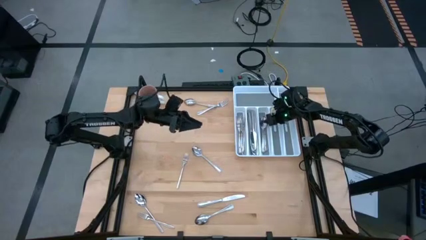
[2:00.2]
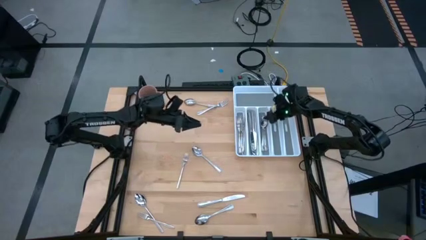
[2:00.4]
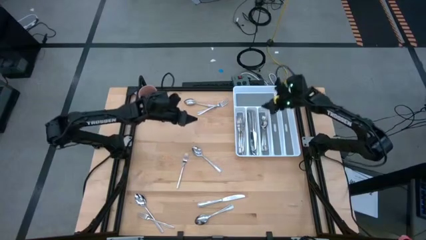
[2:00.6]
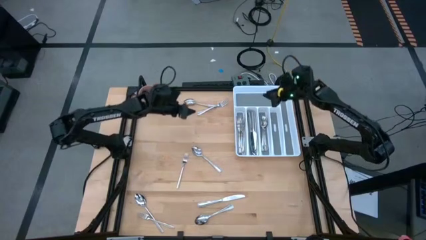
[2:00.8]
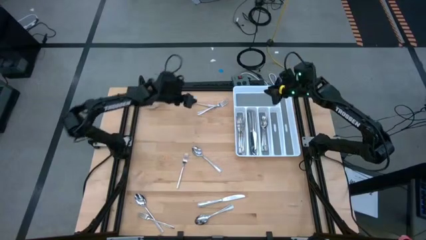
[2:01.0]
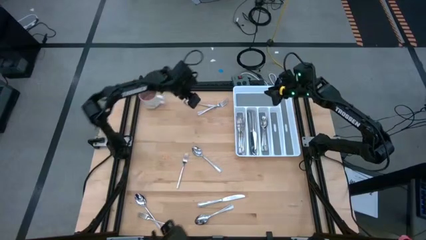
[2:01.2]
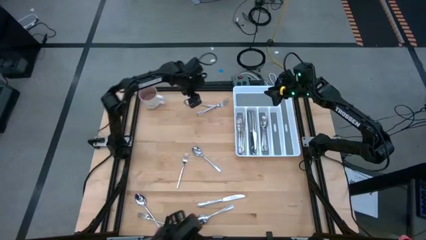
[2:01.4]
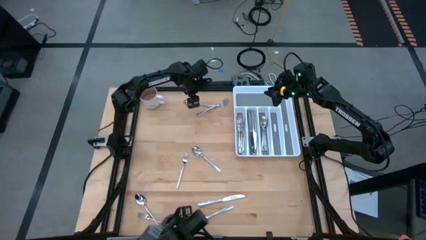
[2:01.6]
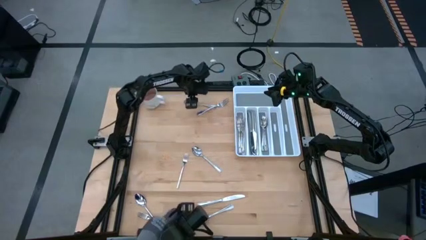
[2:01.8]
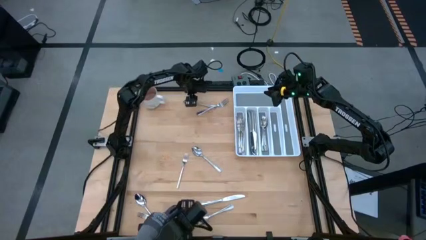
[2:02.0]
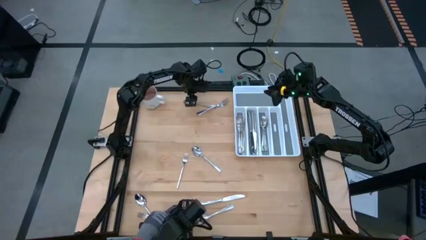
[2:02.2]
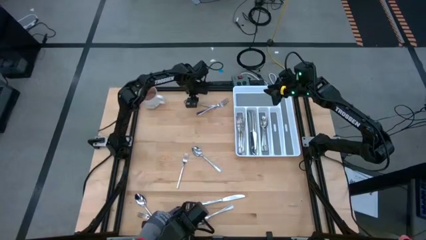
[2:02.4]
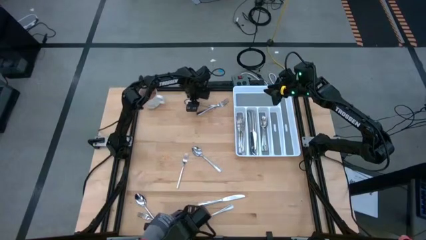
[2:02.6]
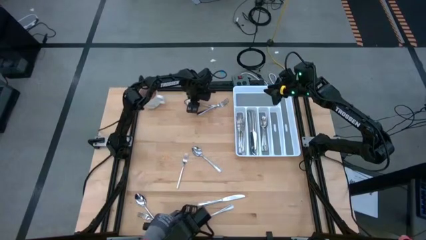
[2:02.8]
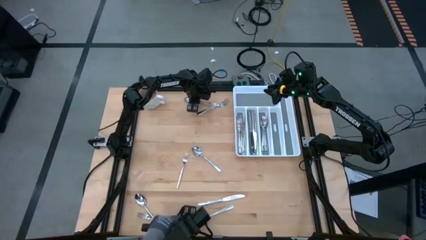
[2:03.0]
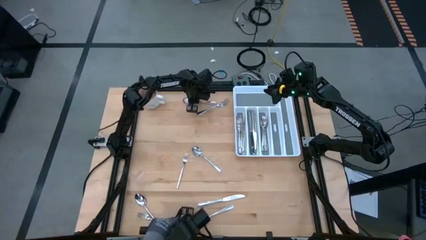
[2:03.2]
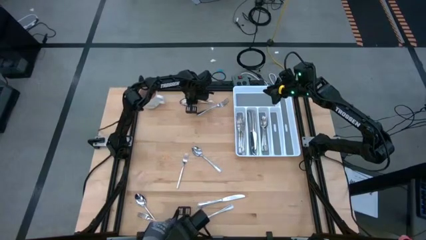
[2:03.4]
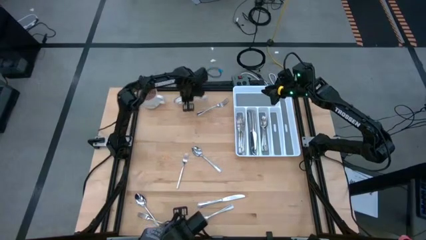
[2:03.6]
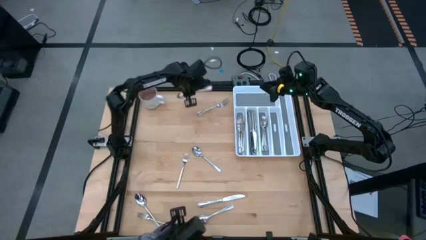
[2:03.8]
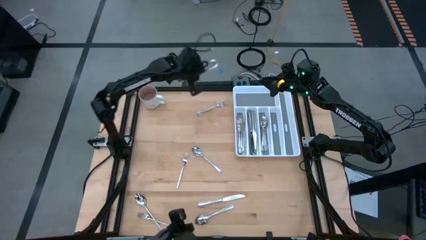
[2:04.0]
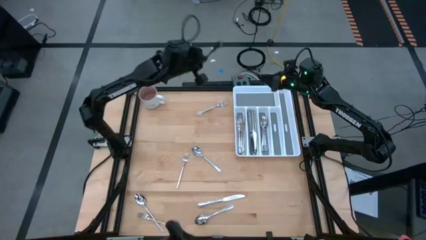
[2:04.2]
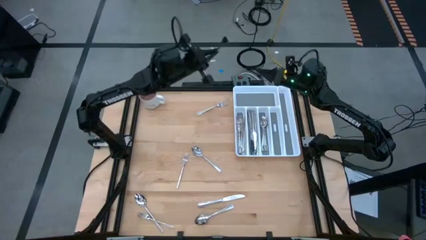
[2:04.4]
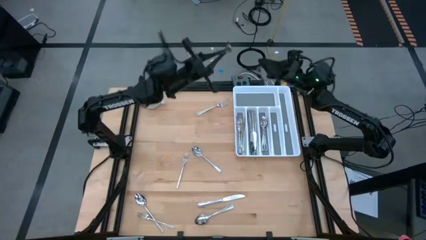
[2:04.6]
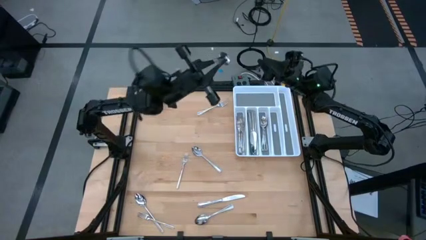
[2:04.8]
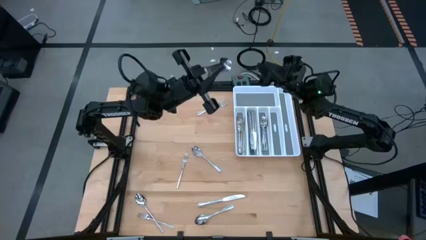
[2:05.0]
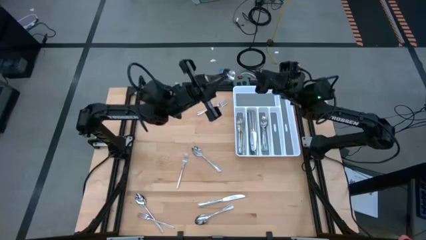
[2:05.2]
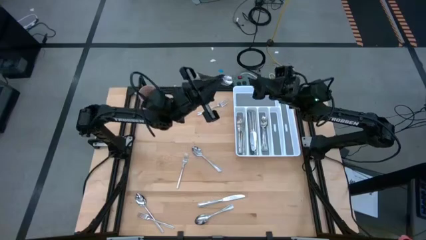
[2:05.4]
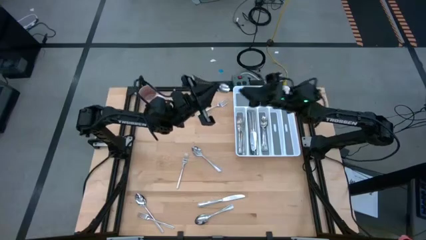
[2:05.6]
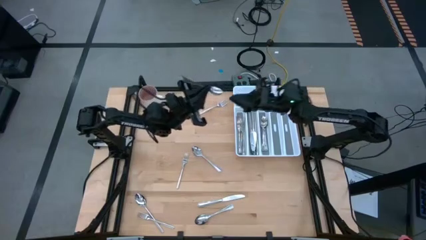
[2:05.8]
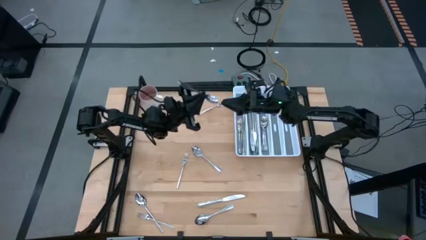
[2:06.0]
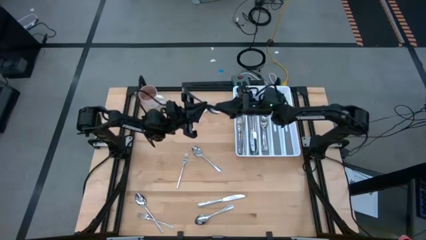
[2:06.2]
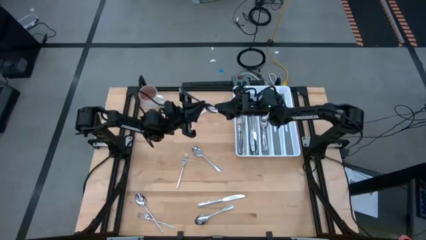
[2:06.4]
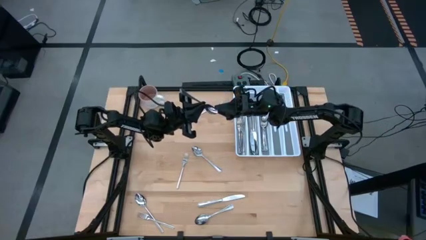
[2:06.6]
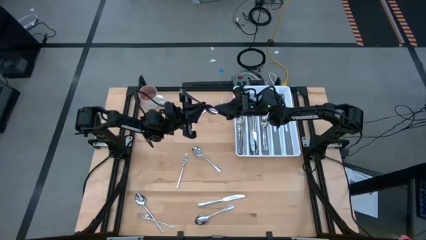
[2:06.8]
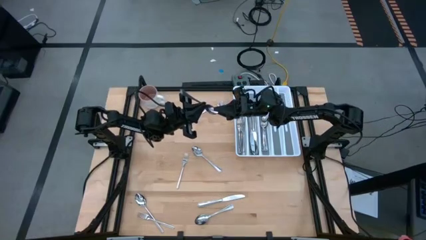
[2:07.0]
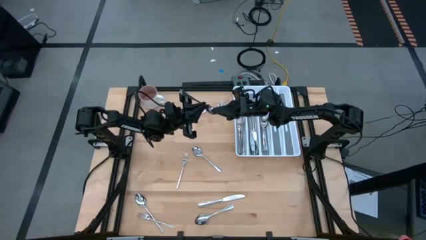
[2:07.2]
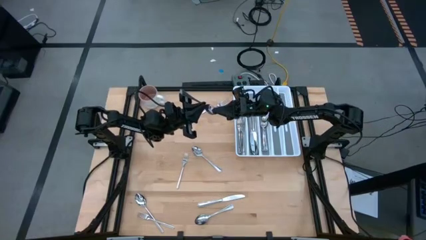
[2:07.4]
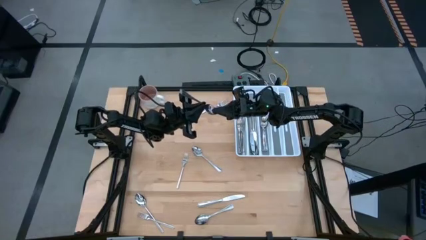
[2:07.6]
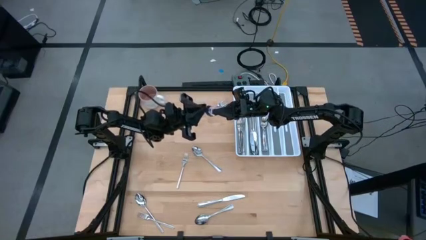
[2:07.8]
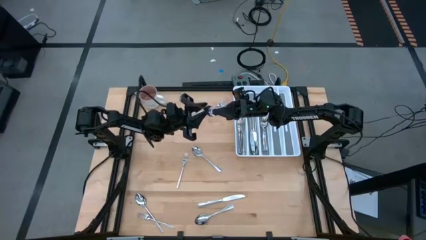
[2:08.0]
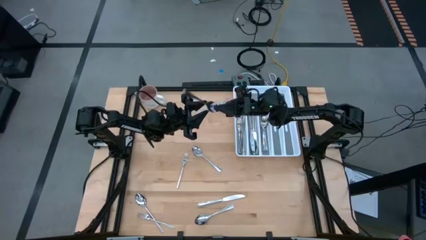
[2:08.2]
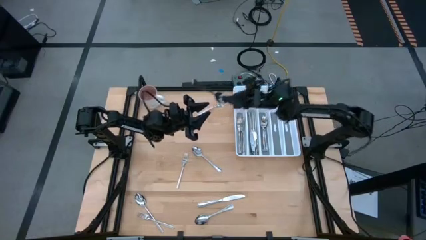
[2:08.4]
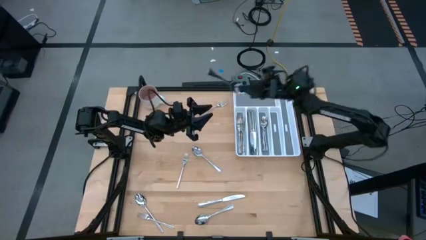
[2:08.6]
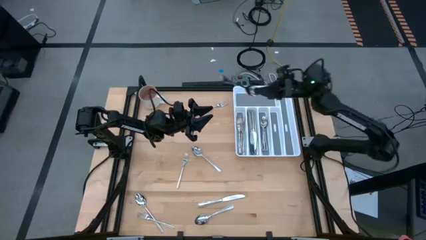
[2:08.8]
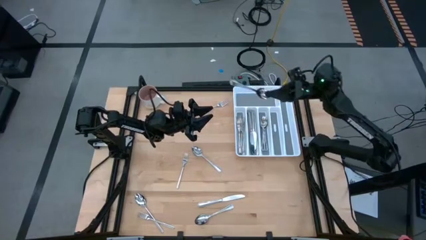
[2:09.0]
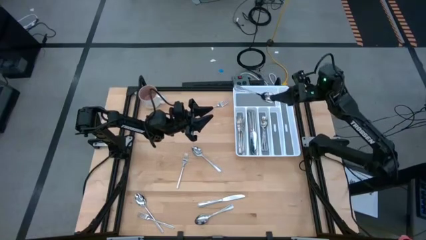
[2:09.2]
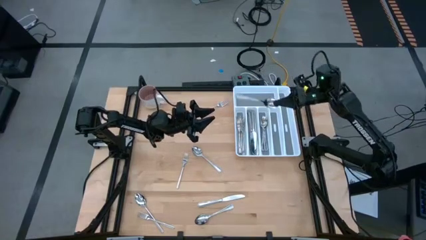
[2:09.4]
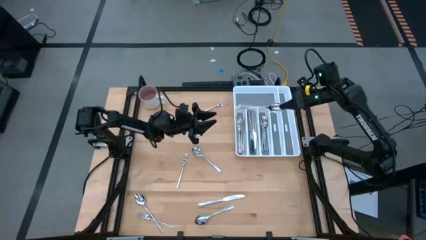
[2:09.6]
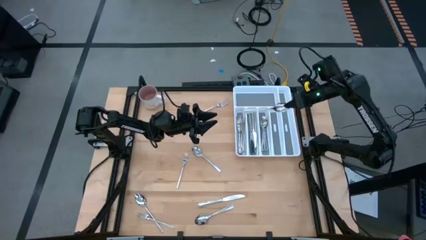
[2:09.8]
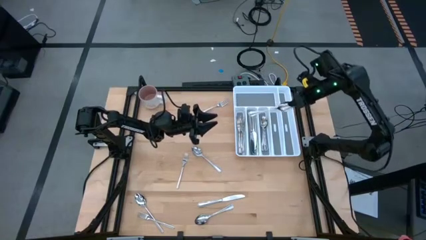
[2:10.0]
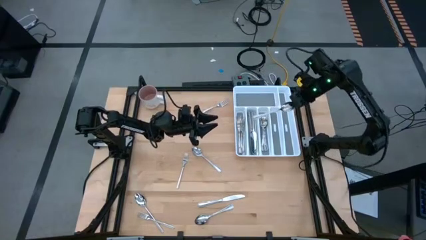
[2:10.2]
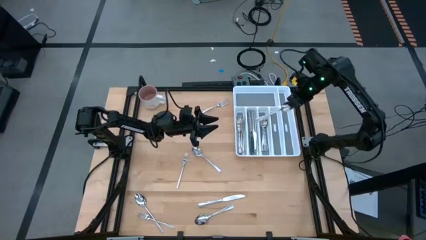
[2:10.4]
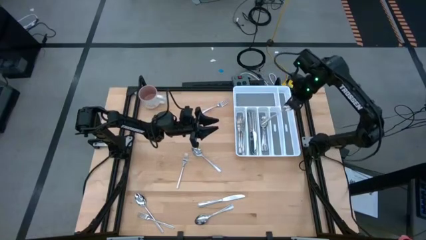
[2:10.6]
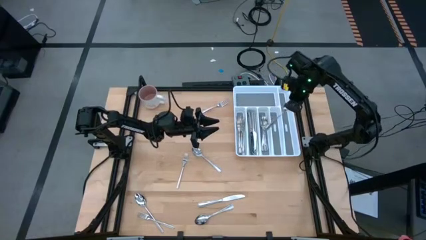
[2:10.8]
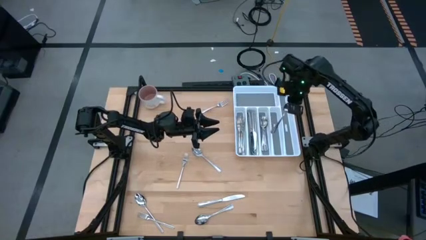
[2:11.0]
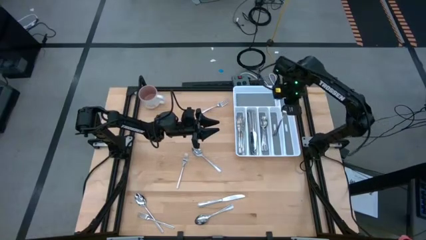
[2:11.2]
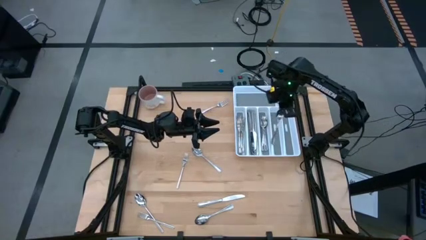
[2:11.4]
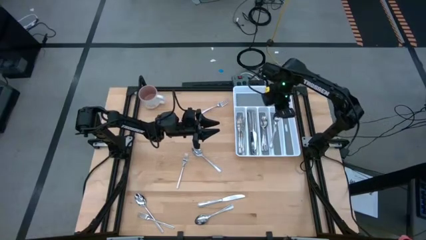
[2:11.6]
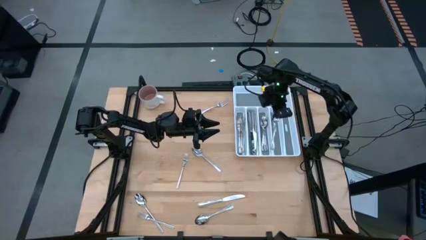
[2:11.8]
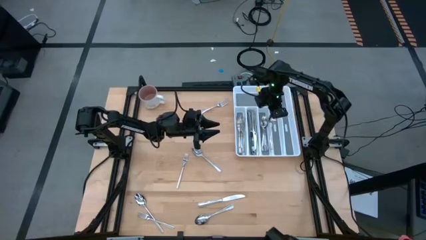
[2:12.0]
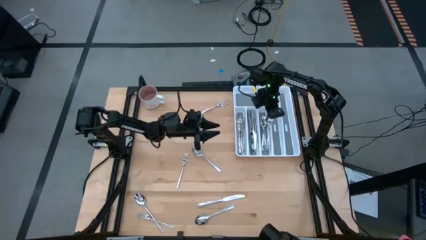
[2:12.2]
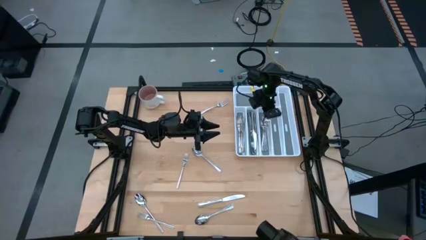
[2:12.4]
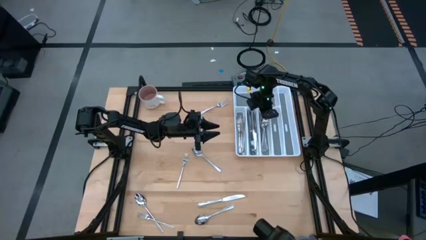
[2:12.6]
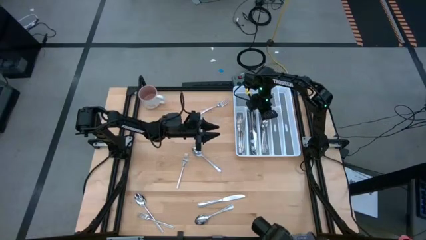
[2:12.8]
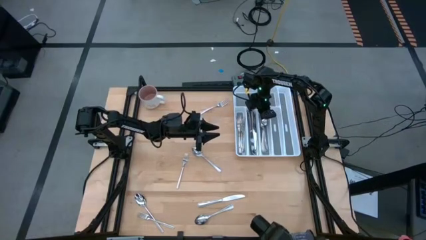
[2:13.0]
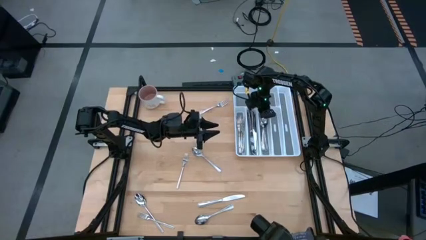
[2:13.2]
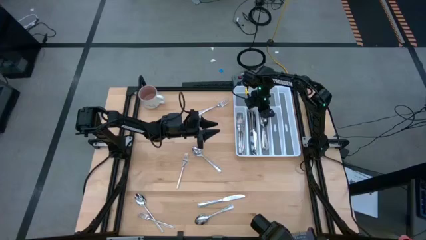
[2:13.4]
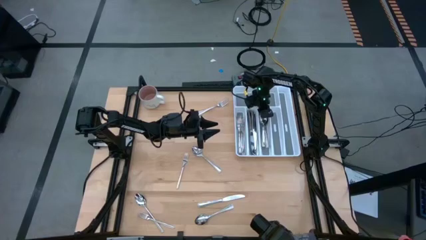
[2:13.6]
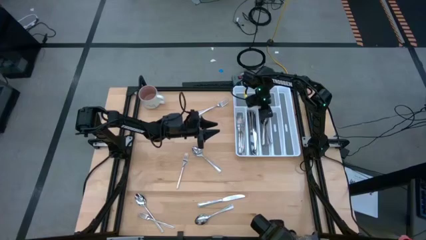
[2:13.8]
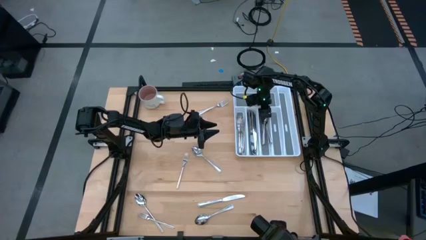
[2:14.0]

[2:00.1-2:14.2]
Task: Sort silverware
Put the silver spoon into the middle right slot of the white silverware tray
